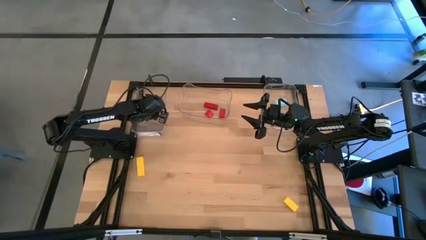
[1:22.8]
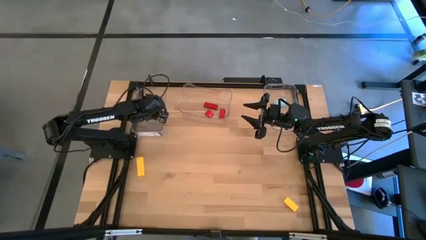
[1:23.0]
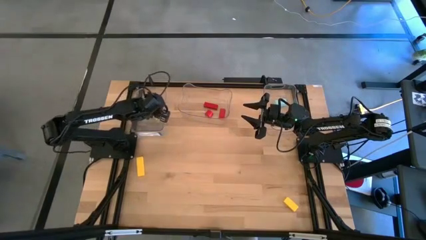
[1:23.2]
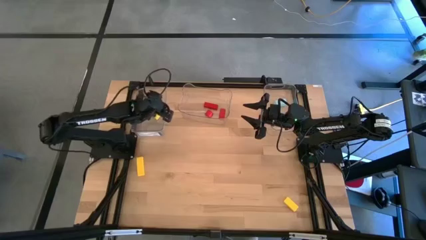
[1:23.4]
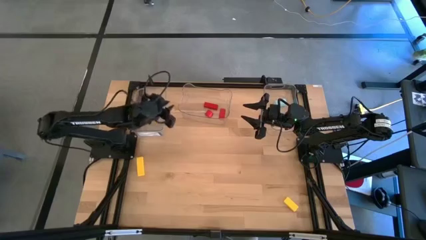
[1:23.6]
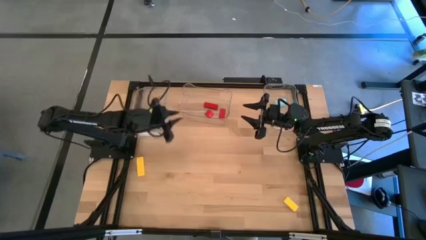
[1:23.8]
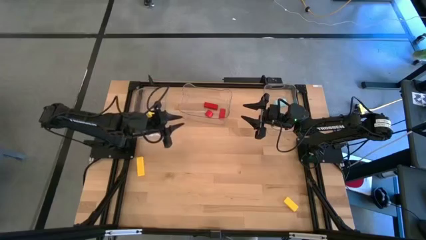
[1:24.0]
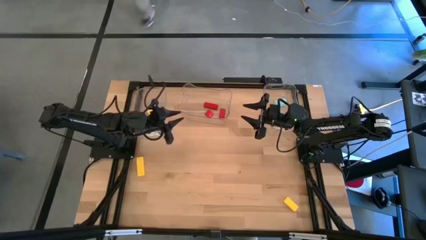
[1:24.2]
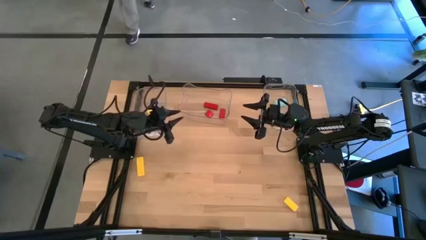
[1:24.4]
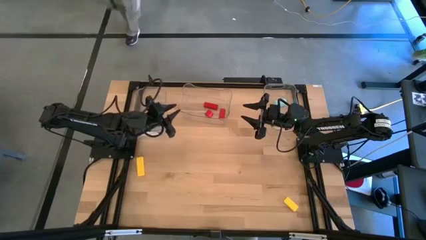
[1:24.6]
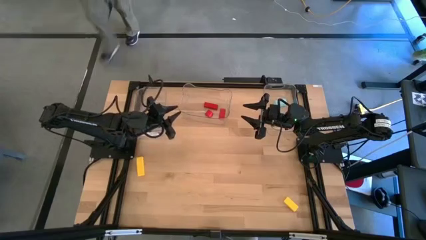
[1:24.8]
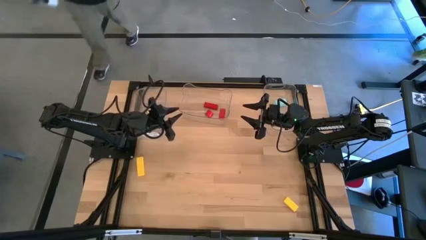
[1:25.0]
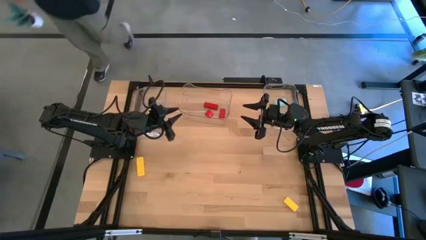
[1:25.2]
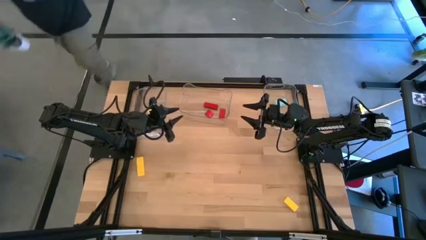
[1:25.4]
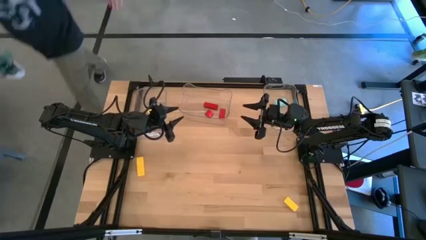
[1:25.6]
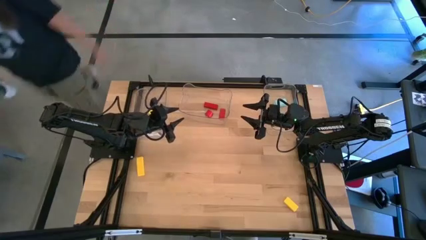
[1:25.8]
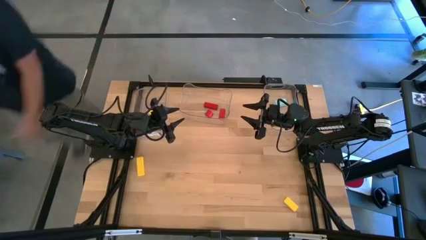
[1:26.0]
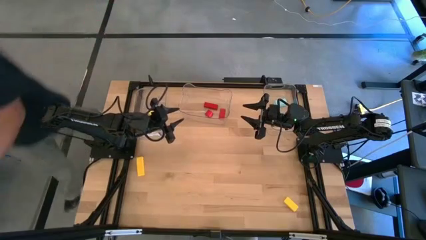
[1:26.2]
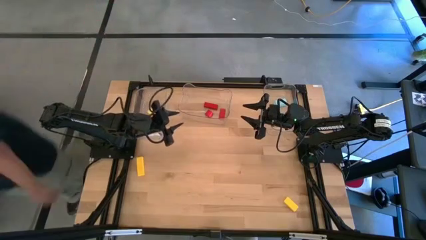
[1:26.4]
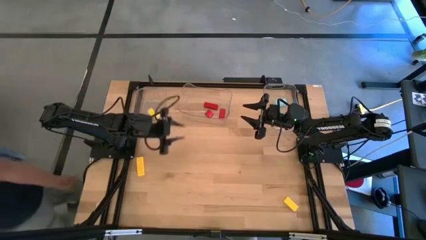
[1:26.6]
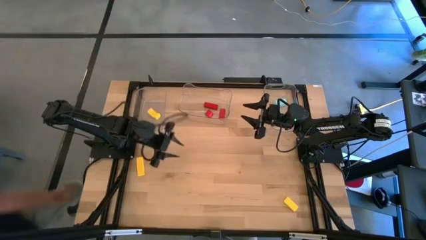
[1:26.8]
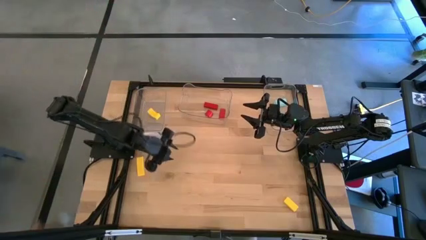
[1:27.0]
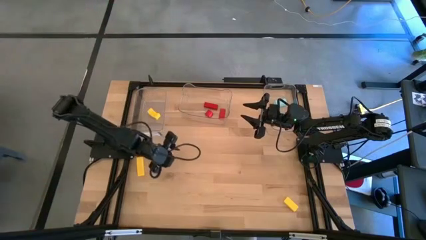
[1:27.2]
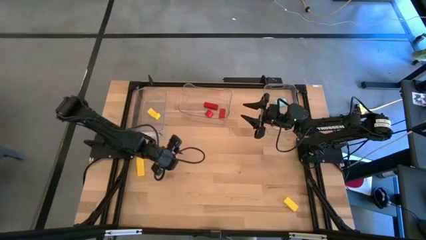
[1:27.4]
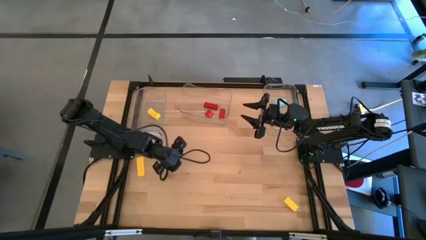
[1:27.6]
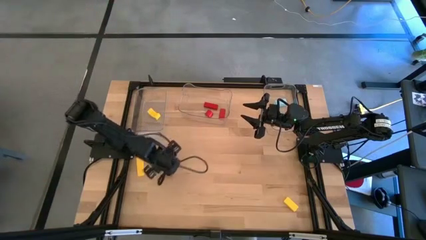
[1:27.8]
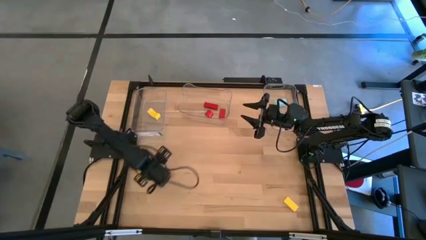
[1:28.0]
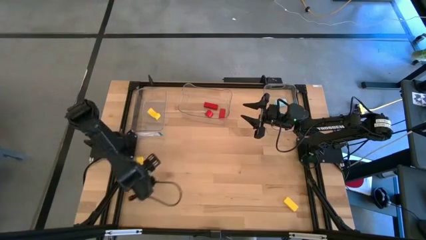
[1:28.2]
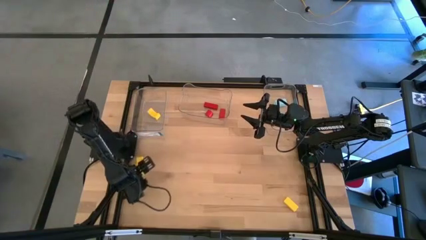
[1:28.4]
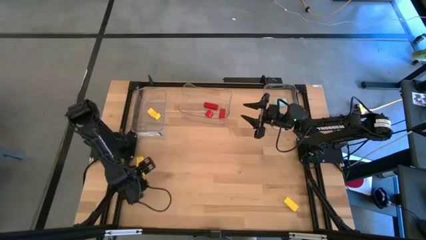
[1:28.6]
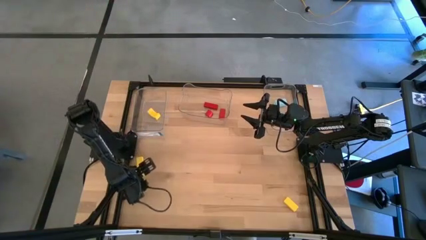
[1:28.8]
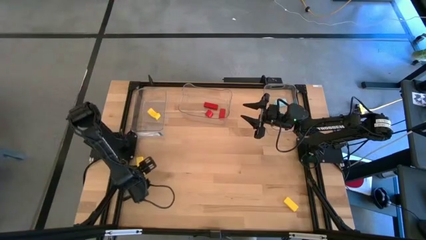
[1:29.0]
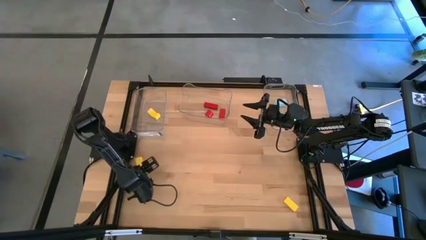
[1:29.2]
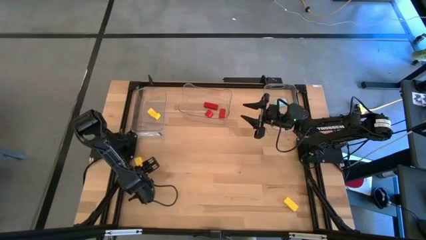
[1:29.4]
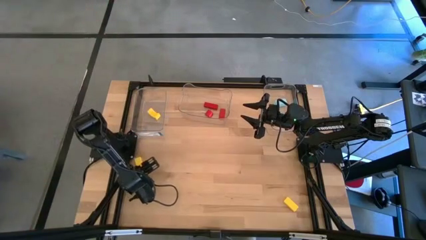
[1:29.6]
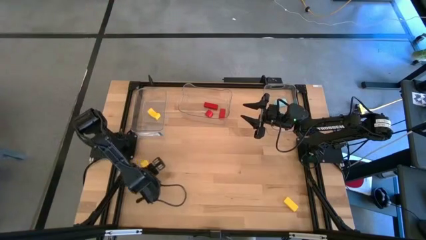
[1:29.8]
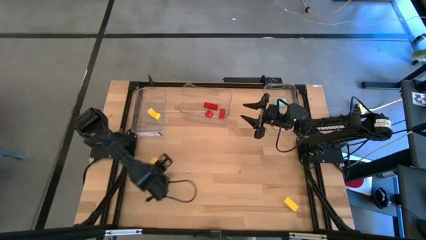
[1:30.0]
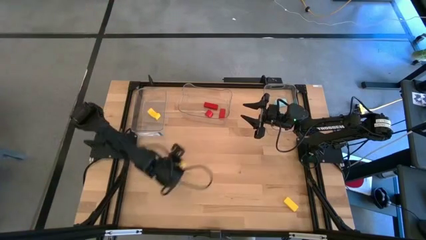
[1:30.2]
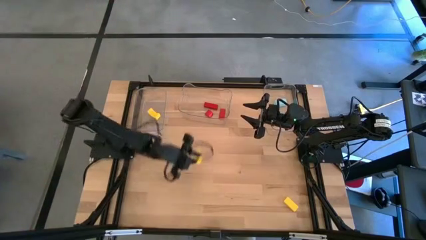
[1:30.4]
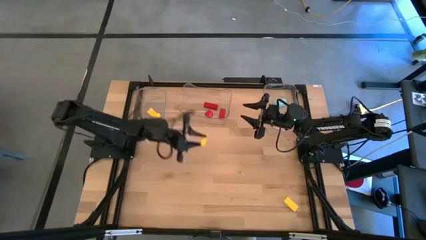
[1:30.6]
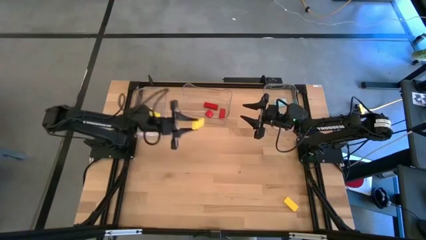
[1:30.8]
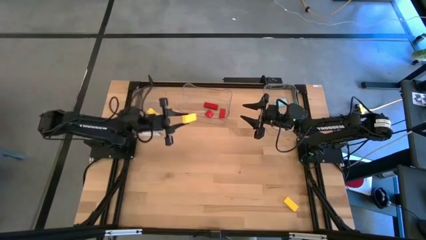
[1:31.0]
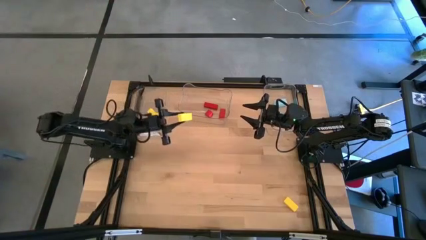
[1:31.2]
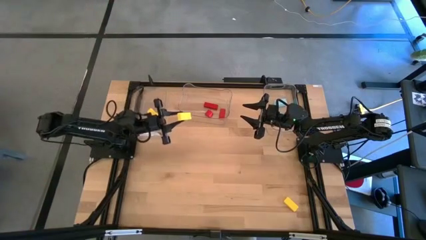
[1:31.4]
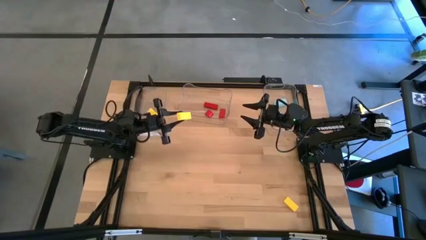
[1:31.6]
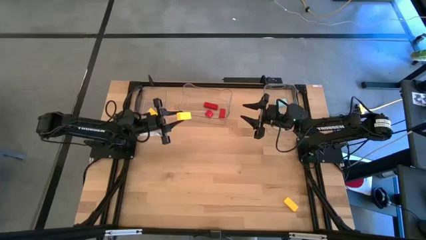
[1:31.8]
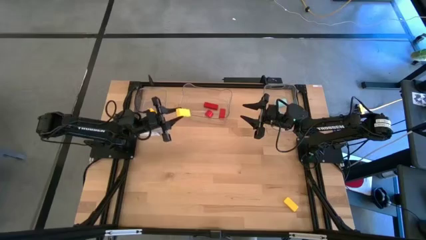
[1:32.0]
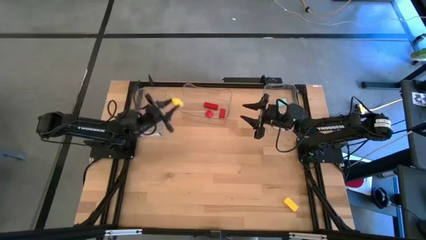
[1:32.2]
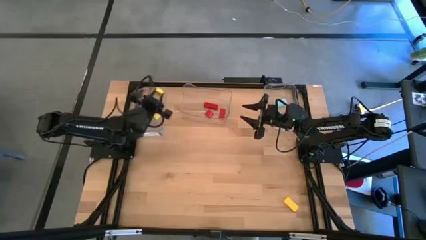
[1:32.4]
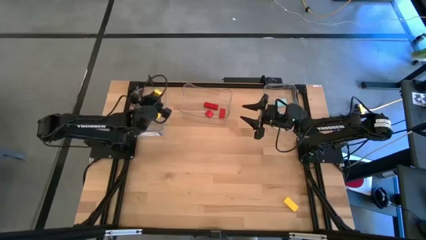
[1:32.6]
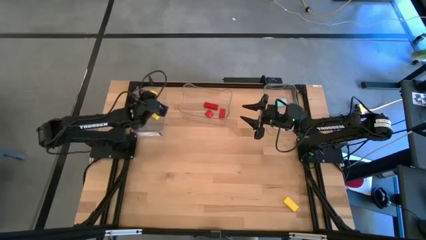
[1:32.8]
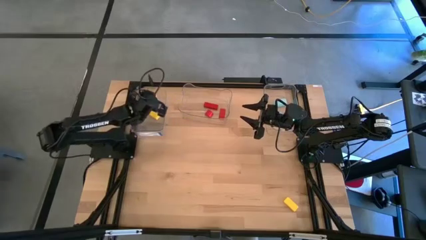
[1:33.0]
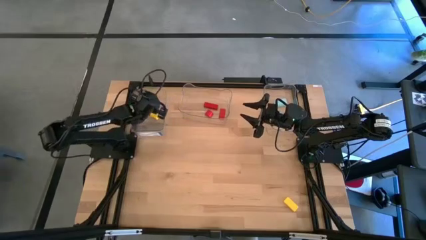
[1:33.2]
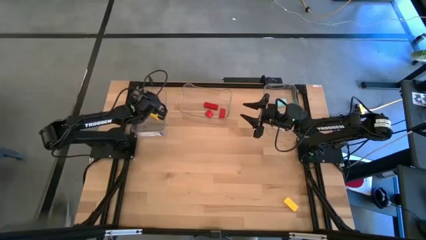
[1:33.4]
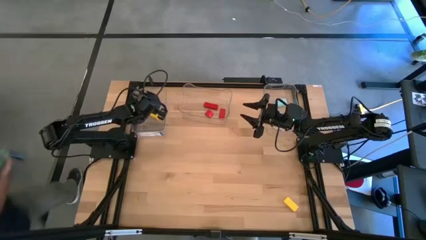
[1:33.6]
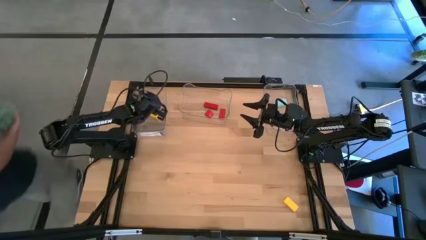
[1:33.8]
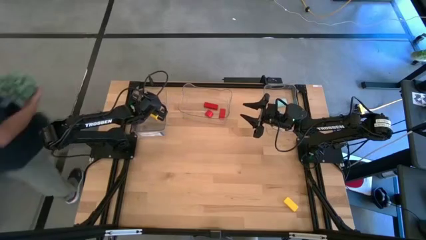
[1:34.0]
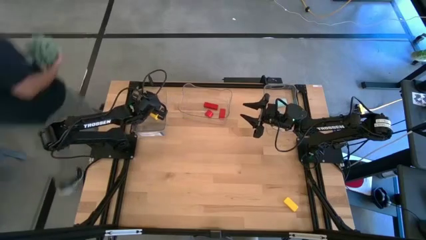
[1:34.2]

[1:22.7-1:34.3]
Task: Sort & place blocks by color
Put the left yellow block into the left transparent bin

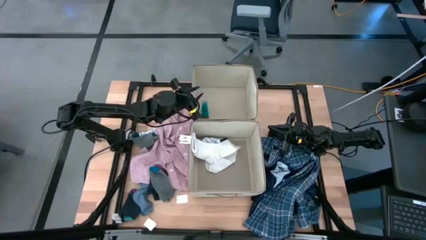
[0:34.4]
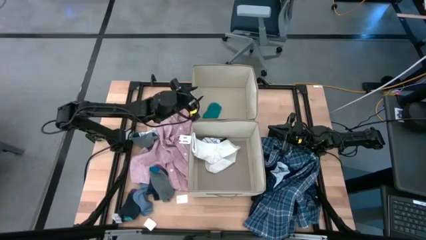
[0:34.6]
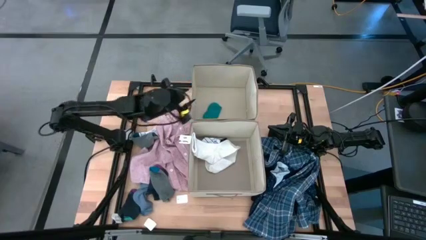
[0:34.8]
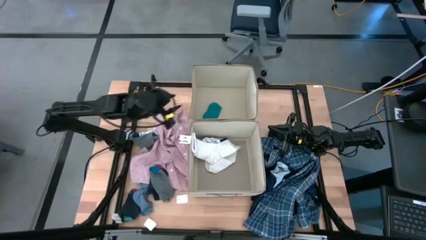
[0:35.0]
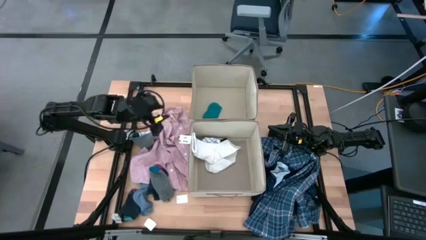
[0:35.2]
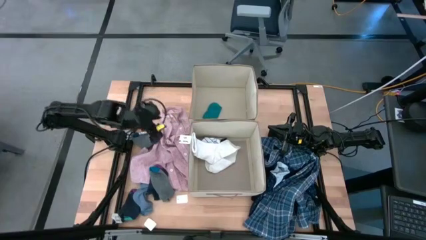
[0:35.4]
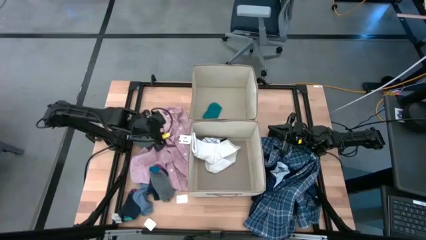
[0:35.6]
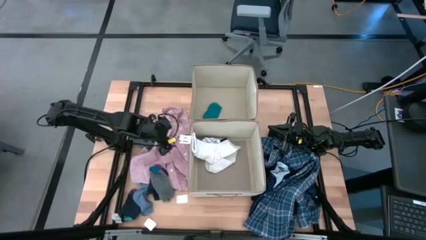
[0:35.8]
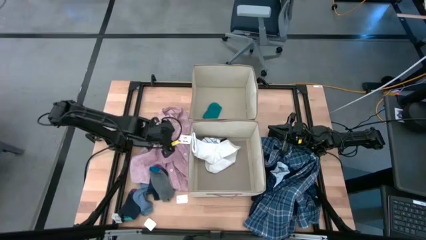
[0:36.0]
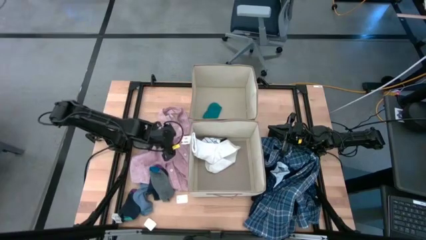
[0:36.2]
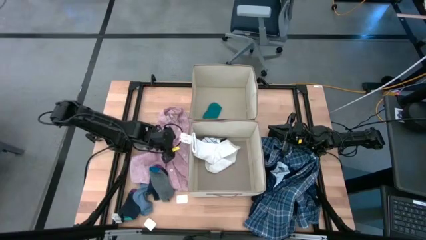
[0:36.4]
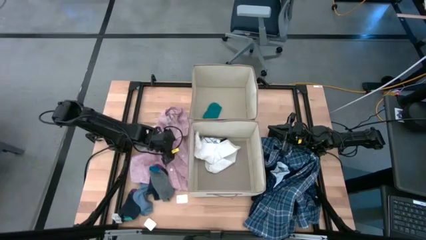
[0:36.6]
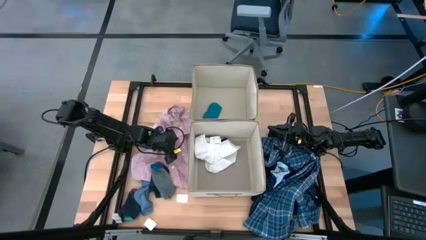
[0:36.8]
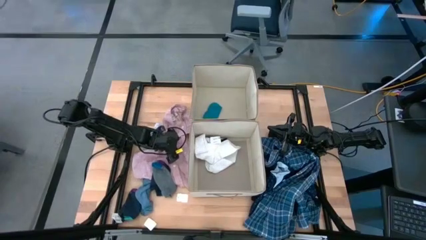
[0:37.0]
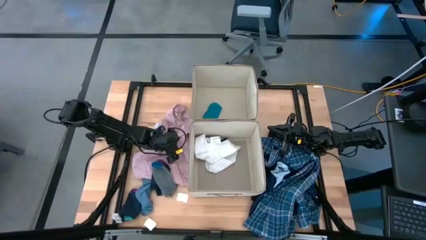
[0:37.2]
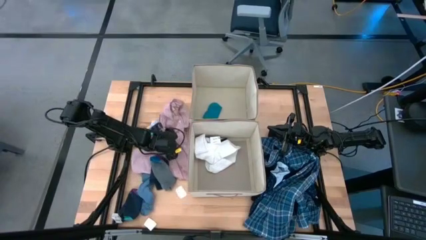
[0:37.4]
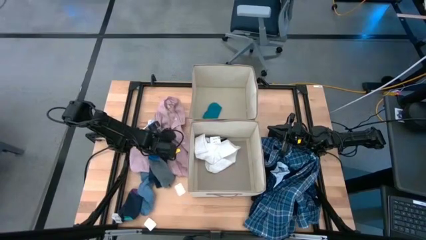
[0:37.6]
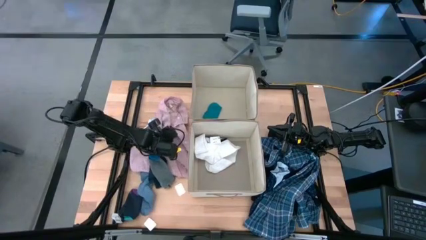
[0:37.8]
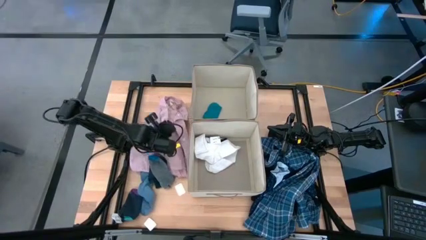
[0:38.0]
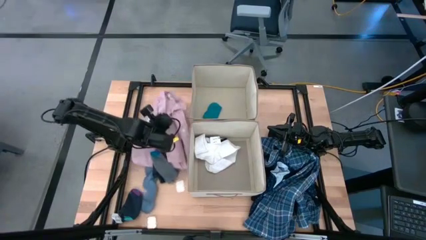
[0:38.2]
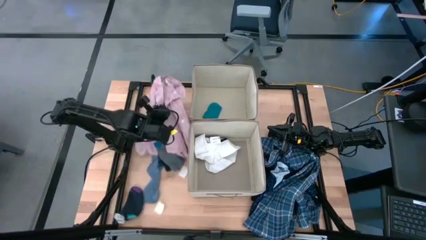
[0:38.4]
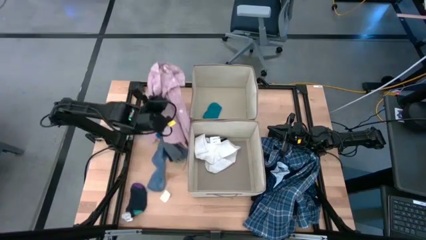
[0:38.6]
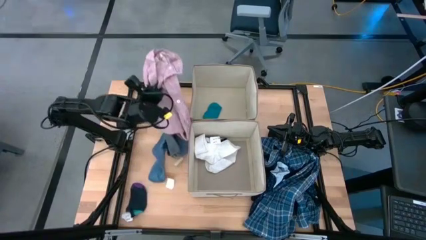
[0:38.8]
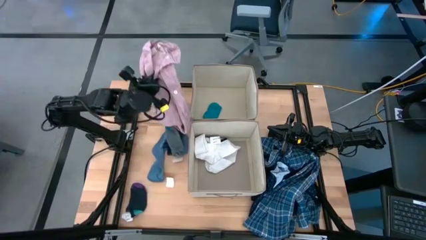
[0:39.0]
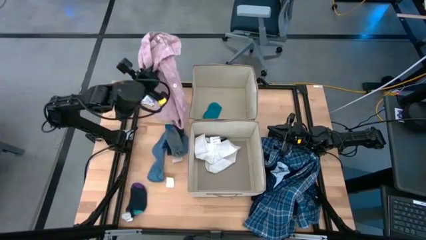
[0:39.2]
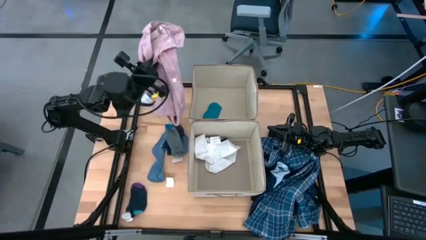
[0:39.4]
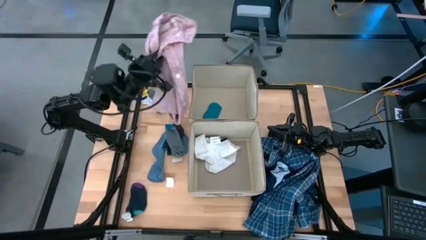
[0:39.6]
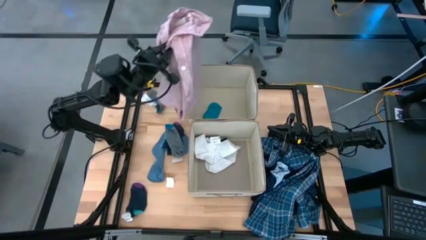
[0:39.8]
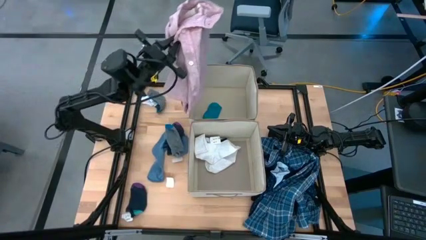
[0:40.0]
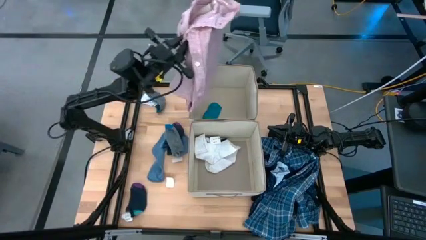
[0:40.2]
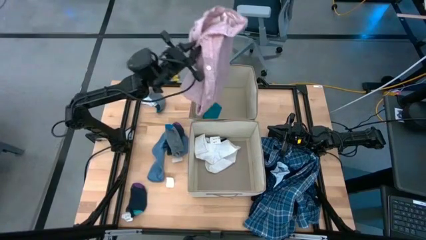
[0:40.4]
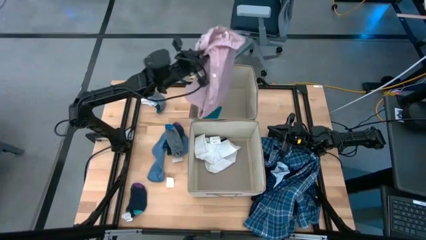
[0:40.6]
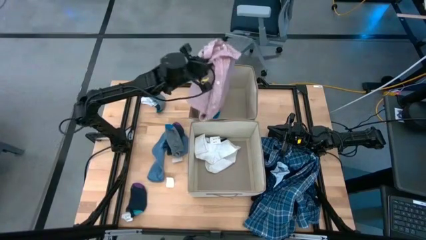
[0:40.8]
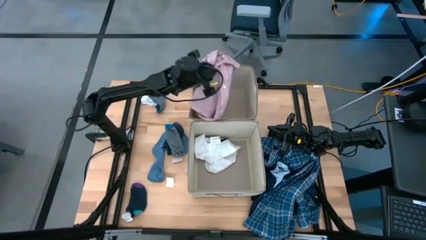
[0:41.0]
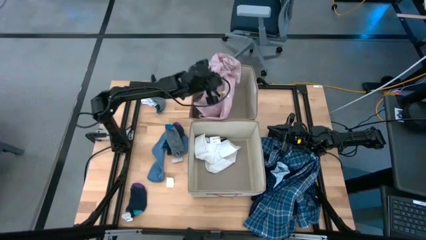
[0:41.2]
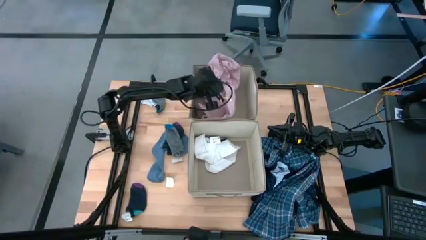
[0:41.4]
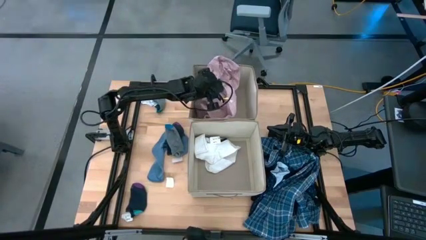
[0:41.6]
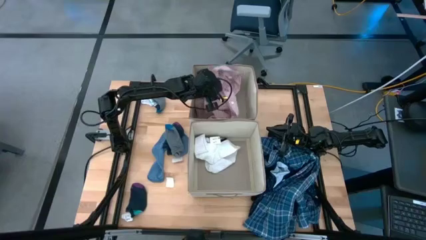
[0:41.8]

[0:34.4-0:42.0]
Task: Sort clothes
Put the pink shirt into the top laundry organizer
